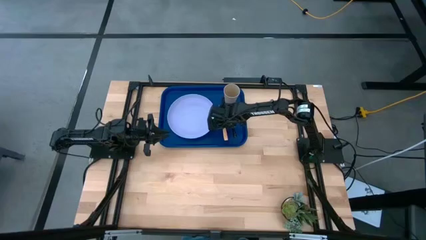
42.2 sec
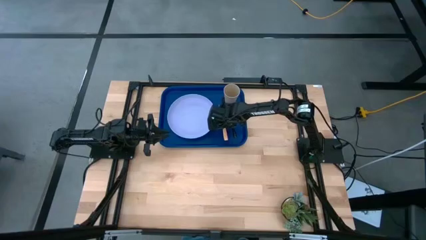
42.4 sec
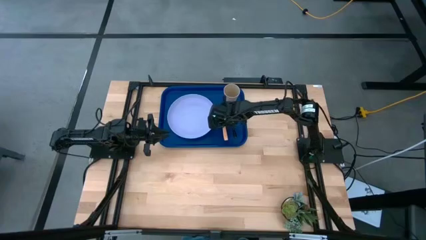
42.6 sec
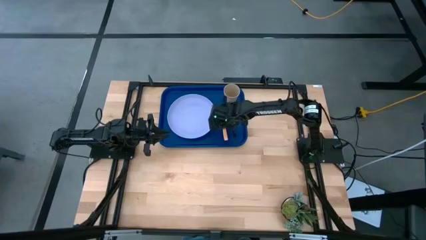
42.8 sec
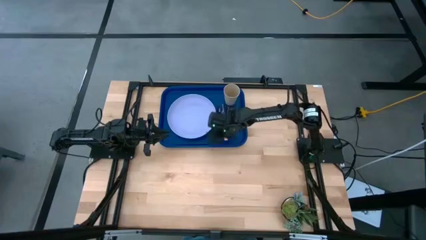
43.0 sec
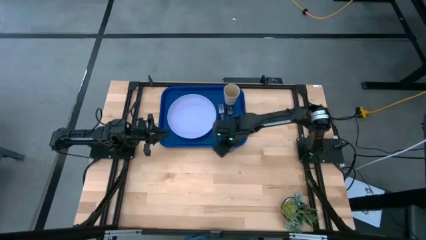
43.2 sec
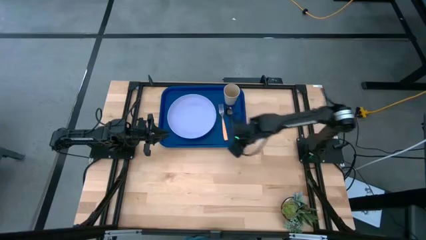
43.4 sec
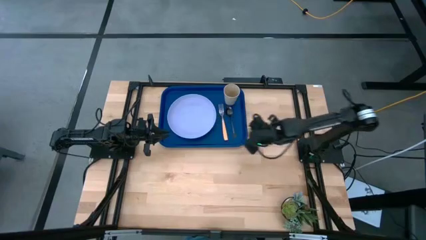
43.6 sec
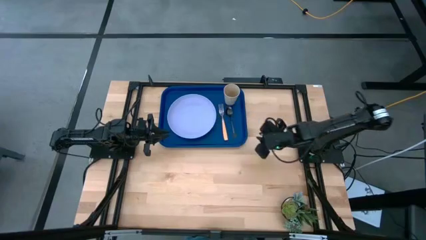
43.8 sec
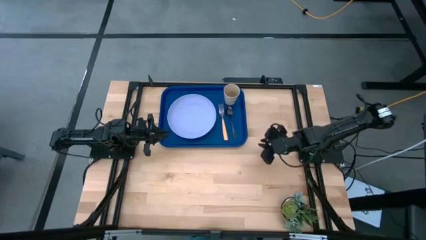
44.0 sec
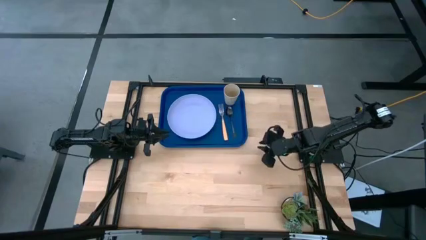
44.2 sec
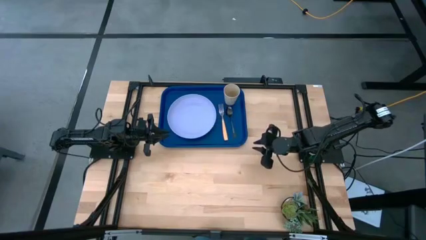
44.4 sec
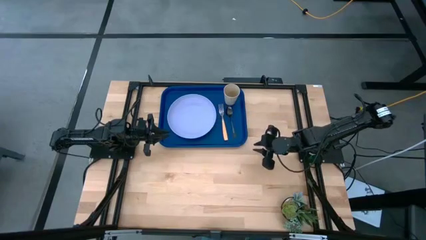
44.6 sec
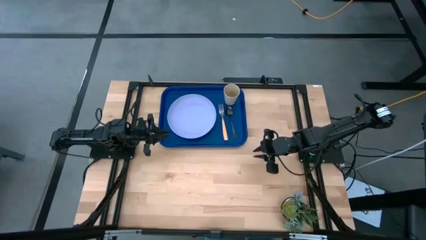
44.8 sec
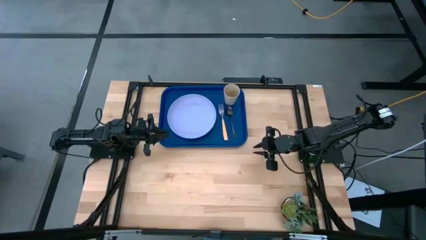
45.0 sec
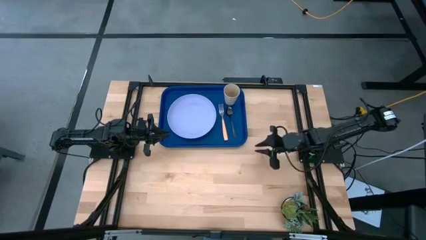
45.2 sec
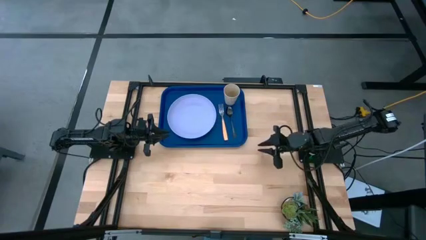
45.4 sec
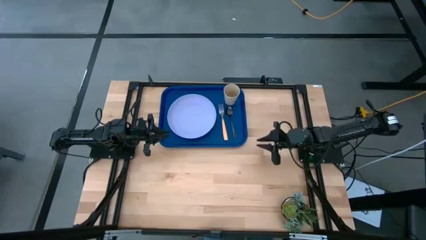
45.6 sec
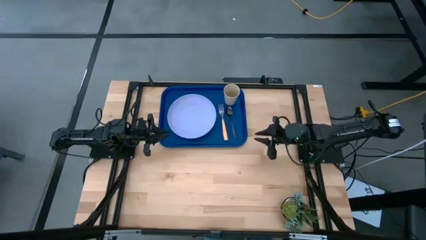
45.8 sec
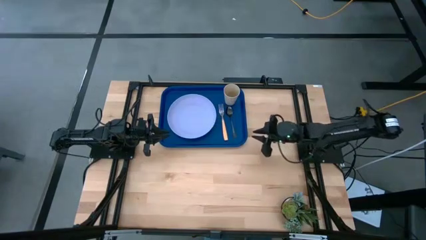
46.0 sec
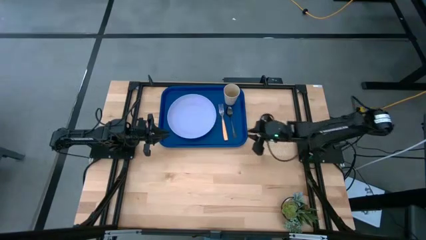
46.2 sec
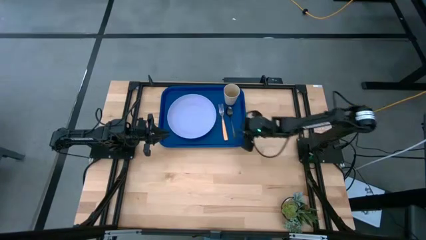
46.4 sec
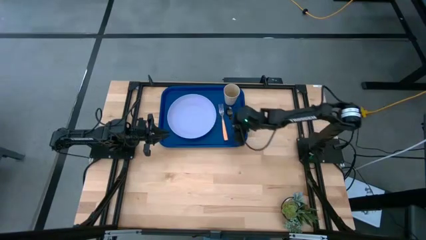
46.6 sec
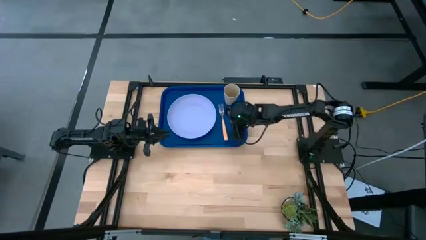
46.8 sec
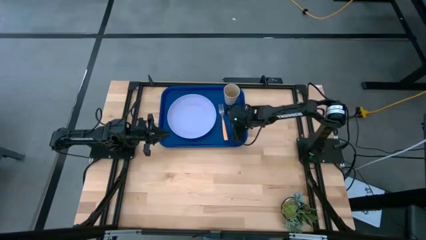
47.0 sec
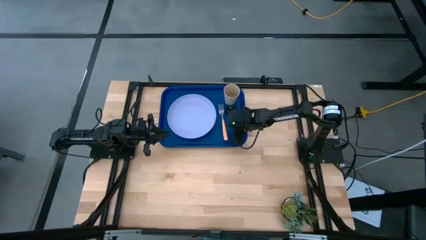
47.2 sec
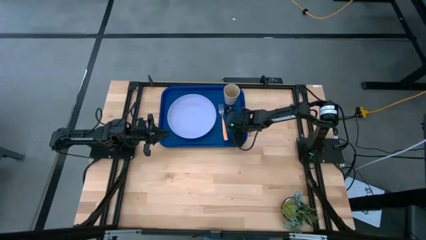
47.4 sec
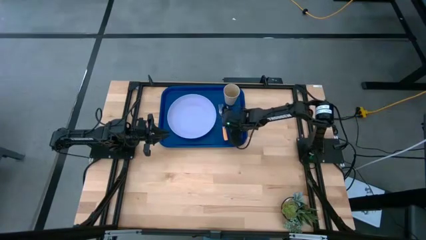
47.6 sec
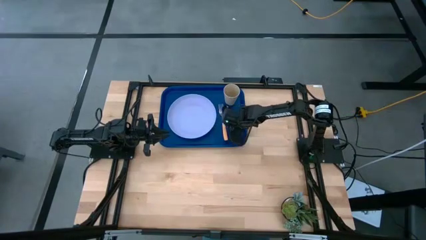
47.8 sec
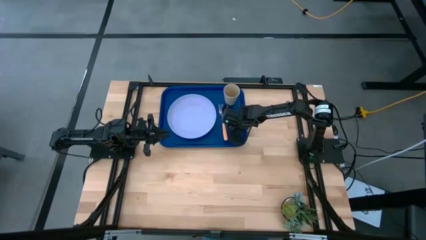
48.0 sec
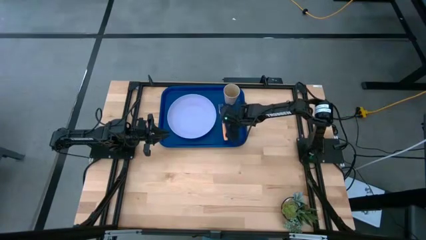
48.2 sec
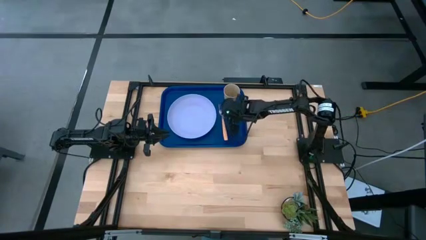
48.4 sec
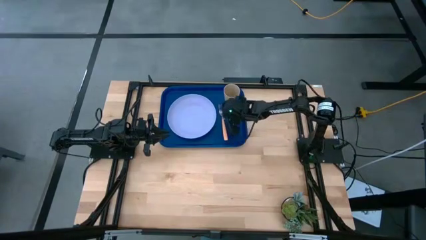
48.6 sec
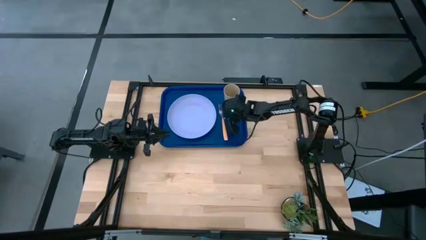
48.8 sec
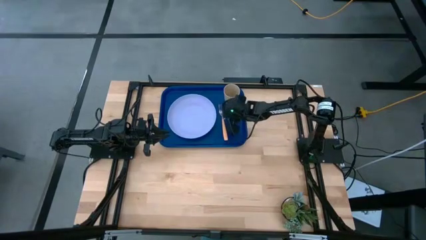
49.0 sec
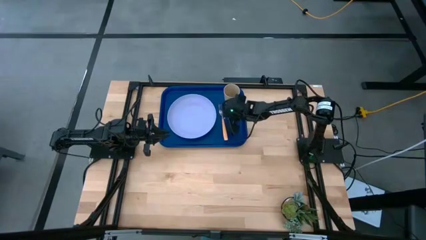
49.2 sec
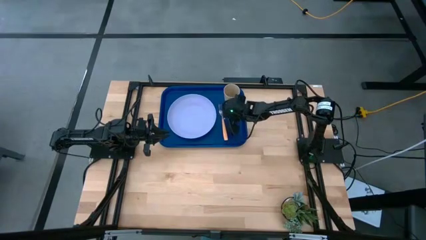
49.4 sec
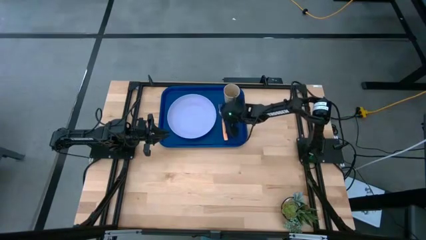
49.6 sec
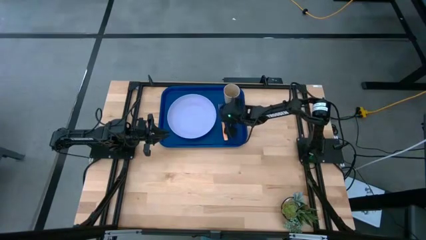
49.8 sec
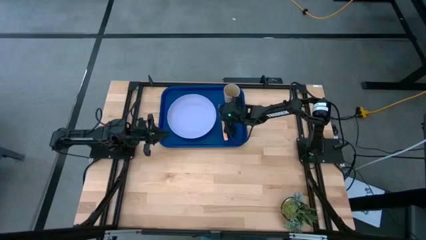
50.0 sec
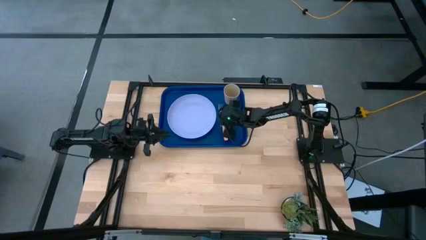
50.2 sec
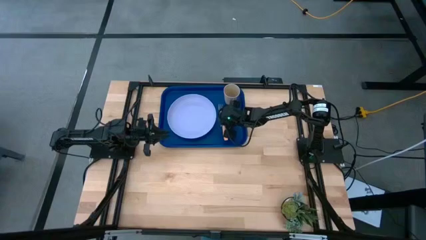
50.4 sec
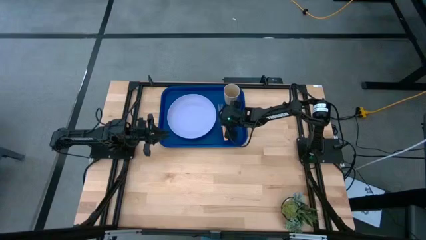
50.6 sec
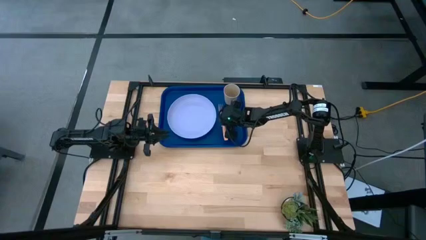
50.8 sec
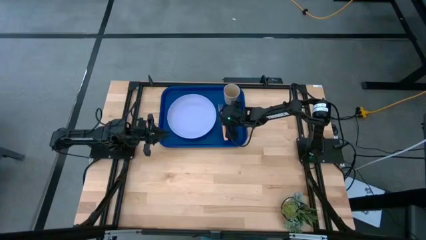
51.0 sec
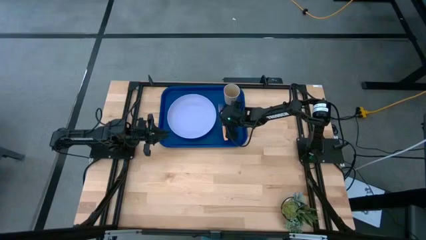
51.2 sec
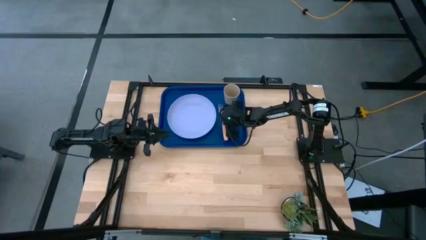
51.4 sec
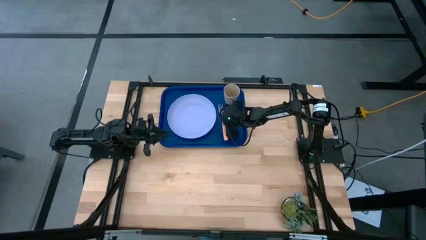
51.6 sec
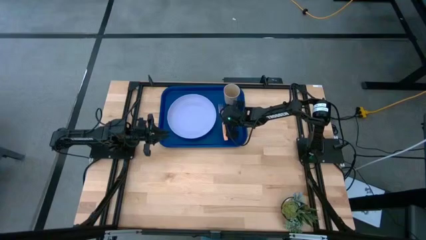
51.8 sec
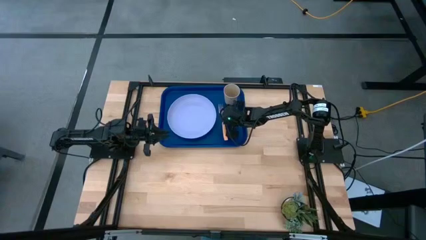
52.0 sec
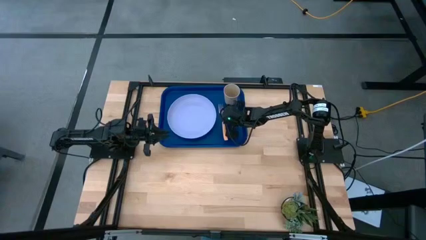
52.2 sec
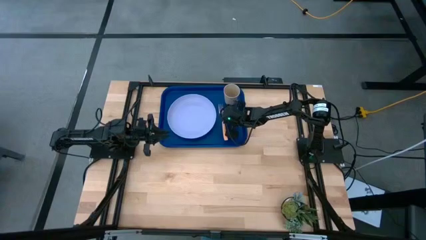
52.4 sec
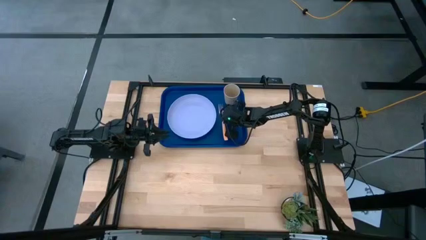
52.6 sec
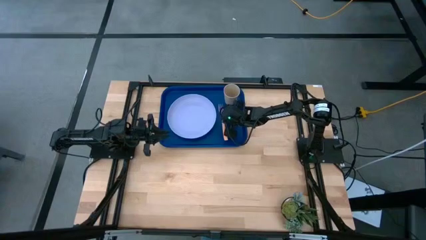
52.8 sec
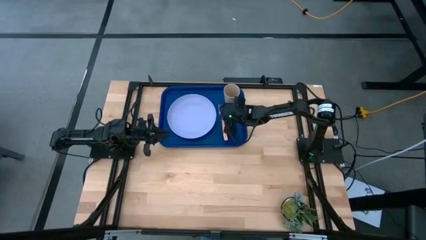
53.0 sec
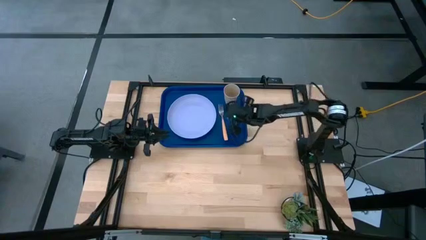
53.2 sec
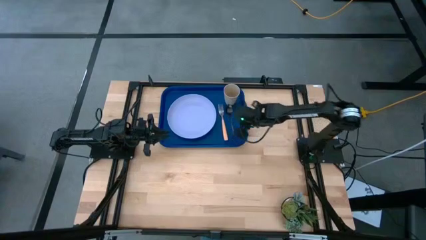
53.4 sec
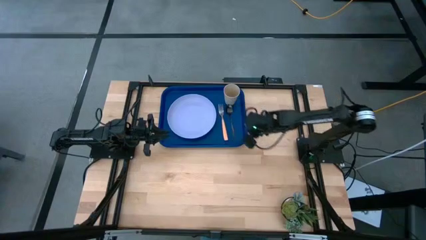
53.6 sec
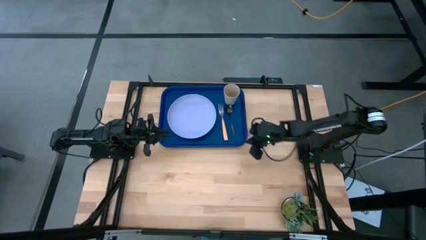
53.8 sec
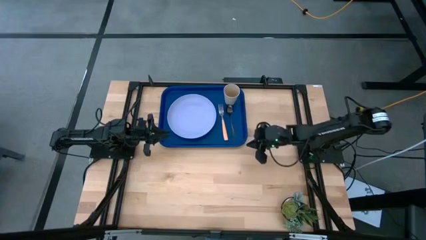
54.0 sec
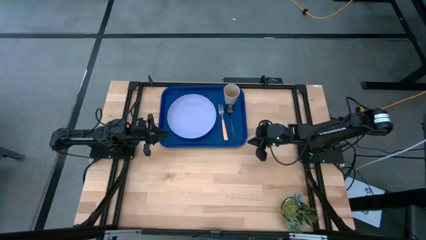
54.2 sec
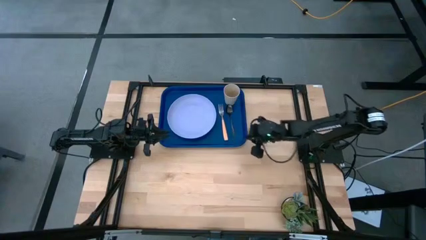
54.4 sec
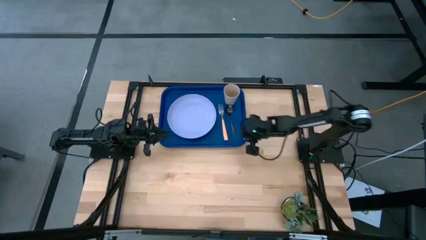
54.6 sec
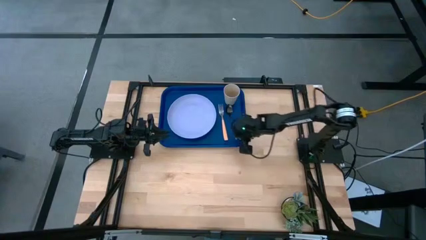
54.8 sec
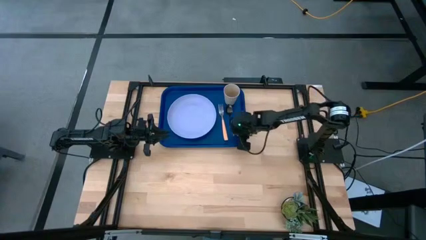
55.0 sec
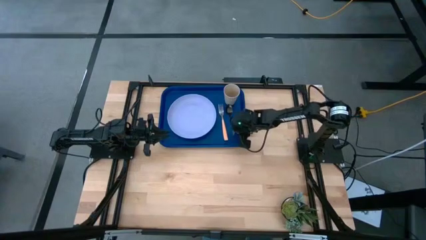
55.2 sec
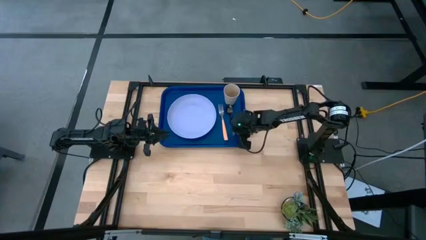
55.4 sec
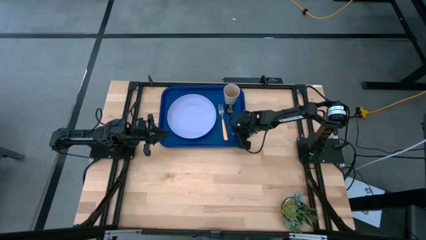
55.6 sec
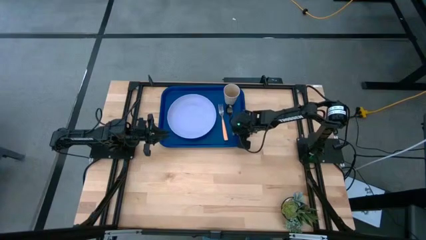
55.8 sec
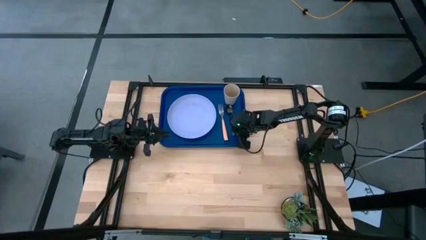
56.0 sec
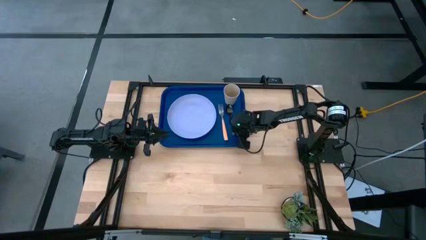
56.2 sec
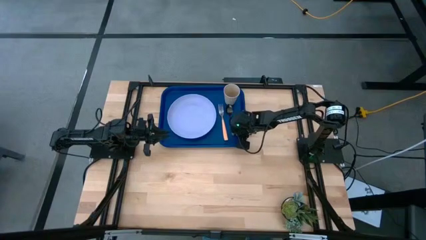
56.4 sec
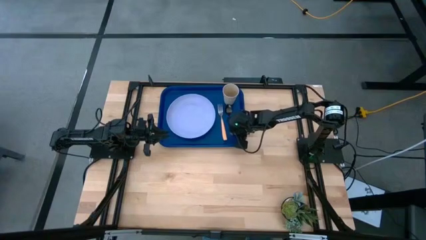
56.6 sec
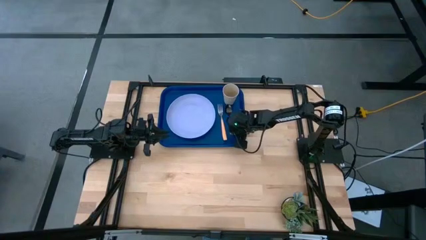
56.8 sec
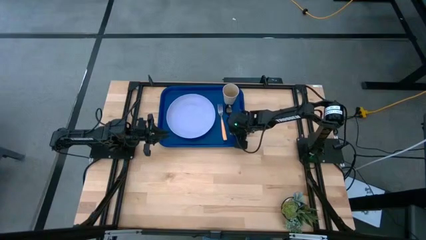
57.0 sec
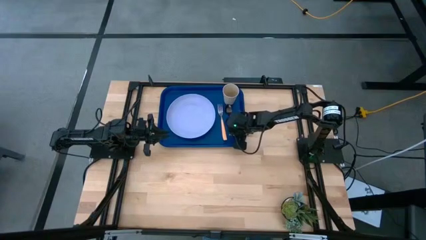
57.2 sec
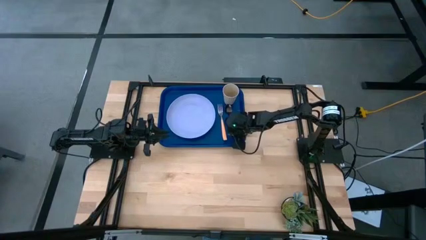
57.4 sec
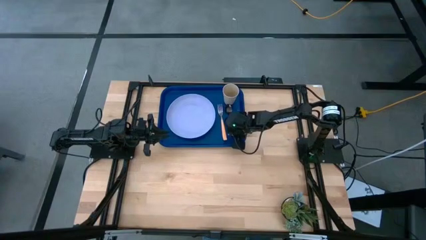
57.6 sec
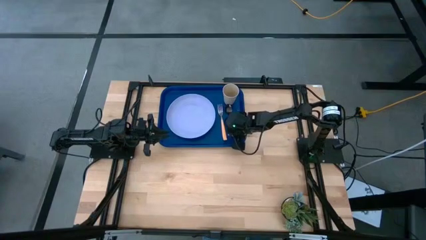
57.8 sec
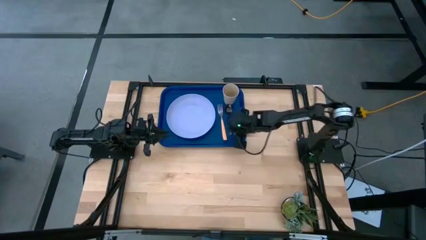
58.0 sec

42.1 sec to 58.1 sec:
Task: Pick and place plate/cup/fork/spoon on tray
Adjust the black spoon
